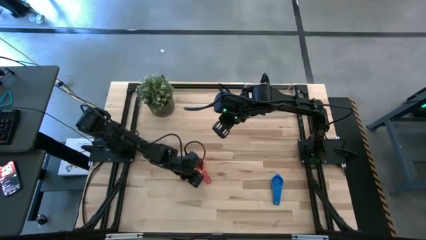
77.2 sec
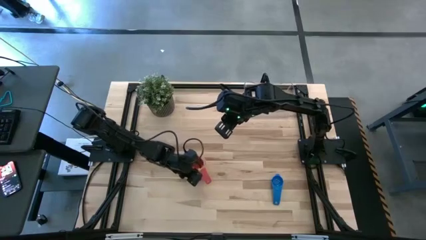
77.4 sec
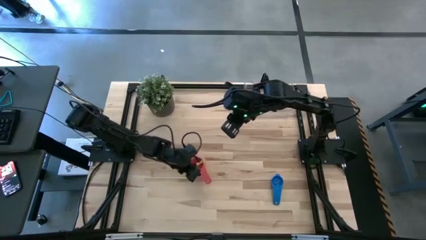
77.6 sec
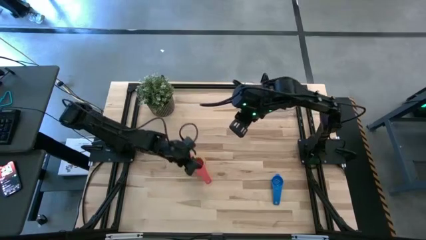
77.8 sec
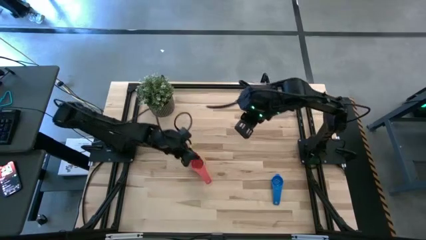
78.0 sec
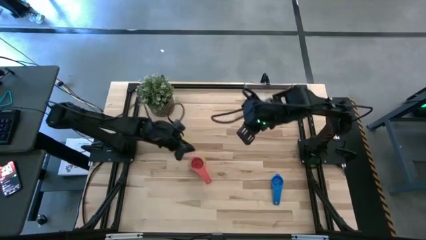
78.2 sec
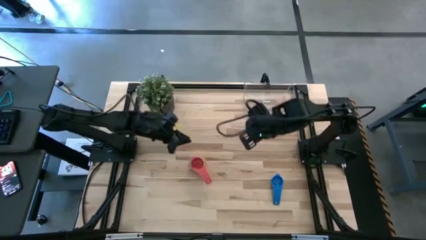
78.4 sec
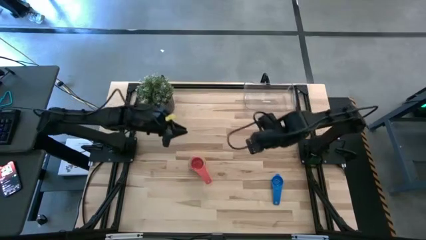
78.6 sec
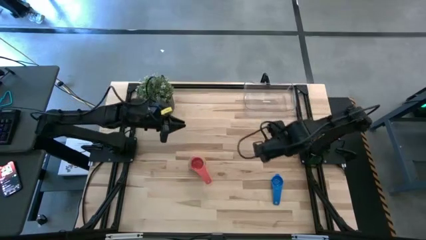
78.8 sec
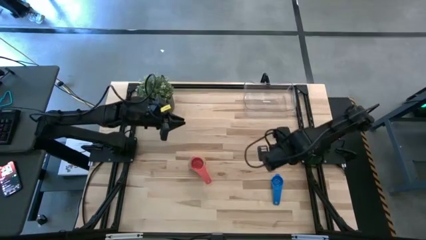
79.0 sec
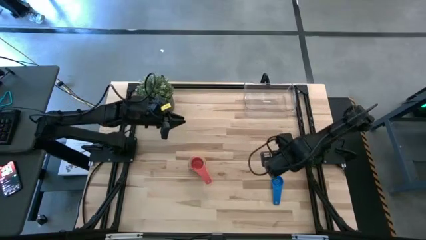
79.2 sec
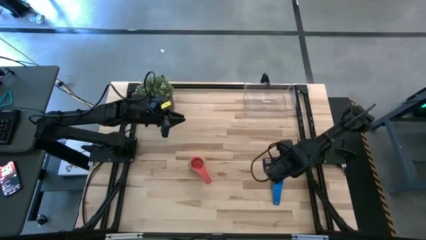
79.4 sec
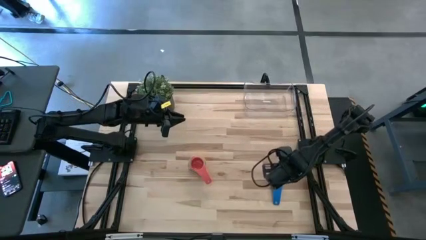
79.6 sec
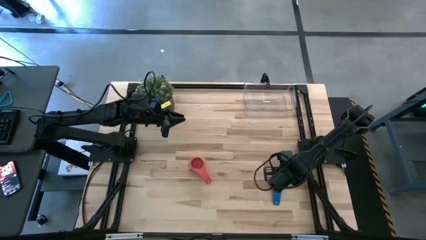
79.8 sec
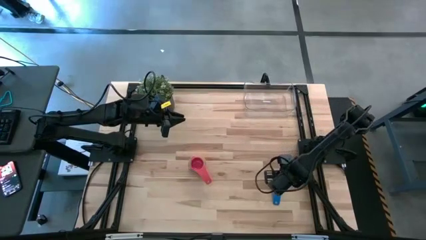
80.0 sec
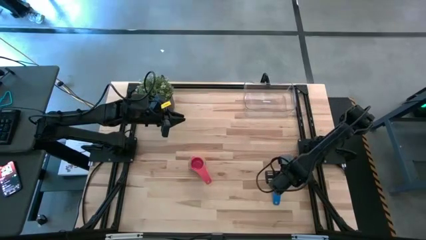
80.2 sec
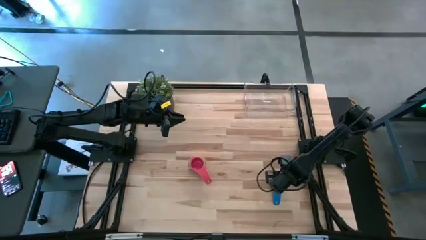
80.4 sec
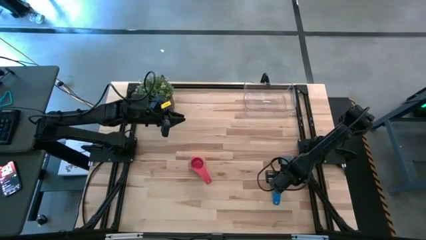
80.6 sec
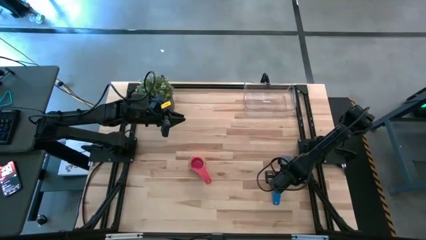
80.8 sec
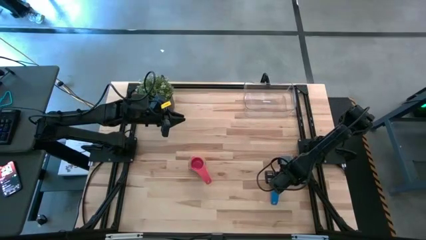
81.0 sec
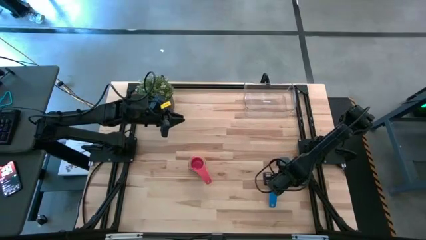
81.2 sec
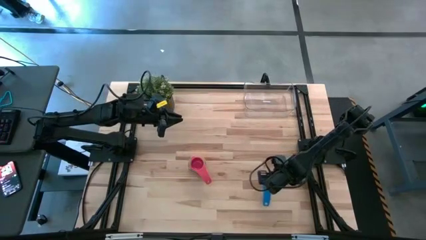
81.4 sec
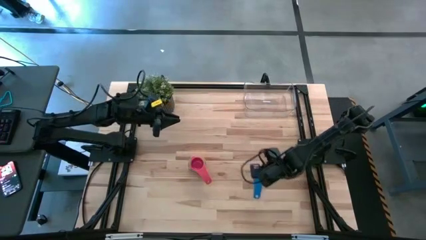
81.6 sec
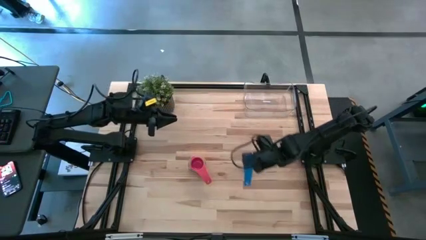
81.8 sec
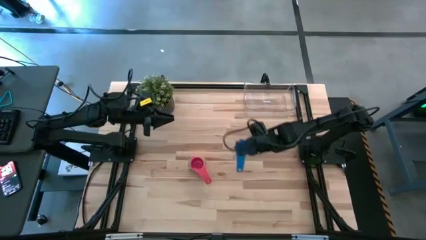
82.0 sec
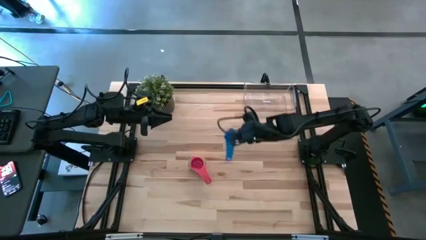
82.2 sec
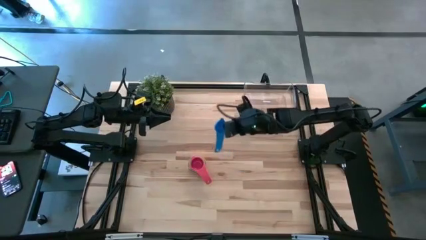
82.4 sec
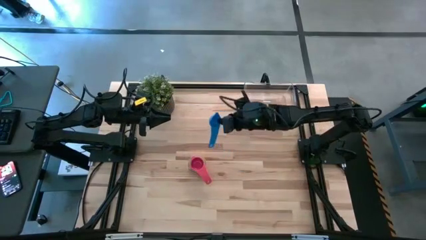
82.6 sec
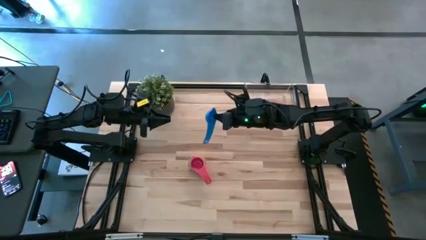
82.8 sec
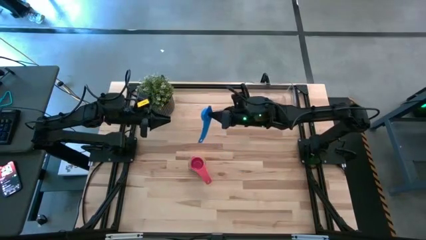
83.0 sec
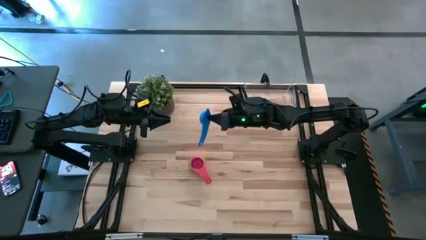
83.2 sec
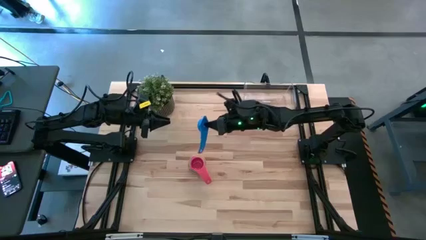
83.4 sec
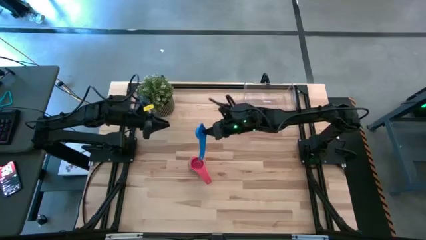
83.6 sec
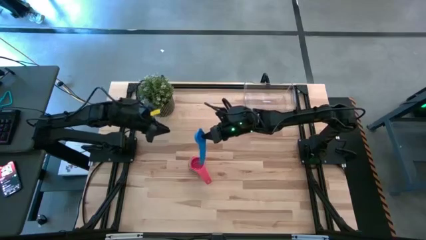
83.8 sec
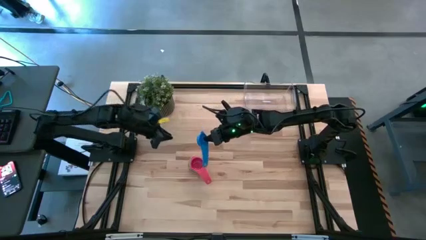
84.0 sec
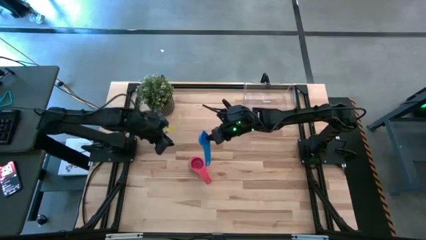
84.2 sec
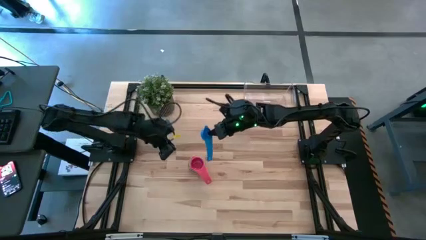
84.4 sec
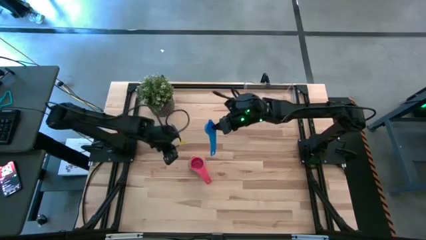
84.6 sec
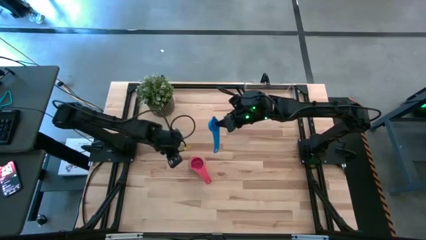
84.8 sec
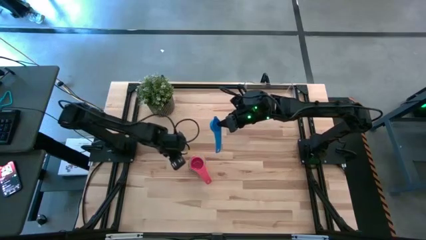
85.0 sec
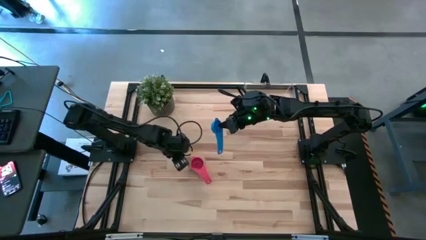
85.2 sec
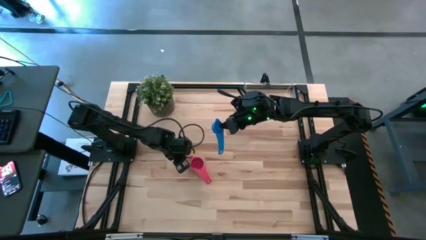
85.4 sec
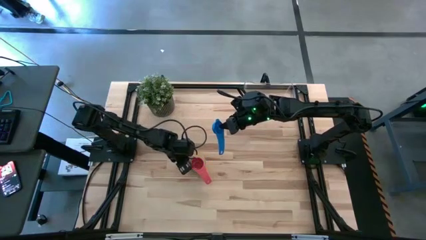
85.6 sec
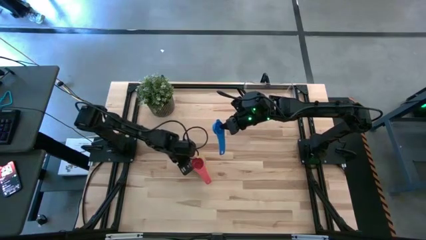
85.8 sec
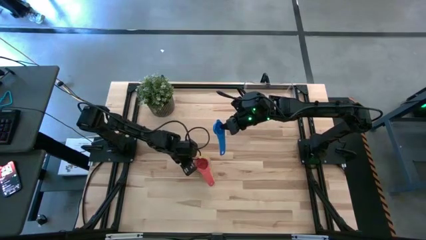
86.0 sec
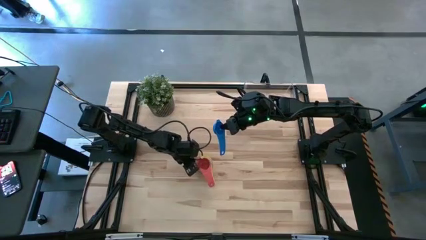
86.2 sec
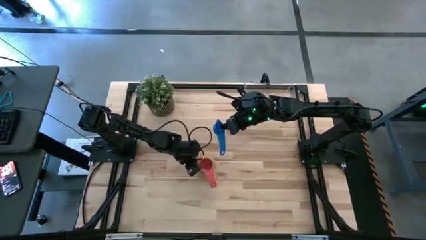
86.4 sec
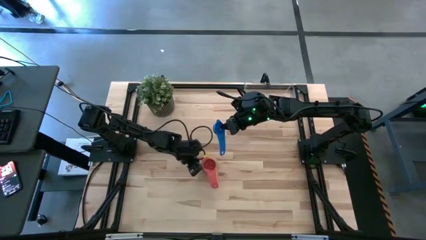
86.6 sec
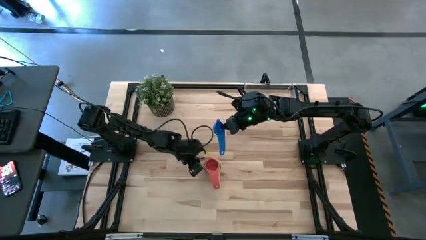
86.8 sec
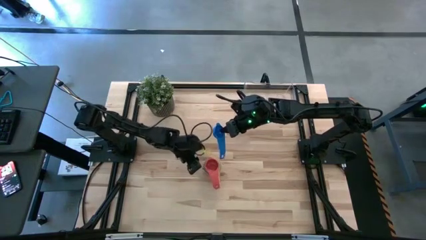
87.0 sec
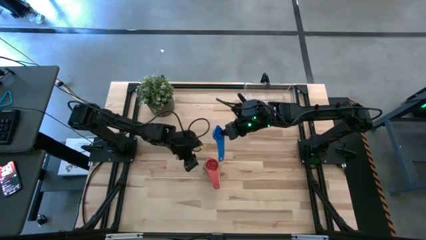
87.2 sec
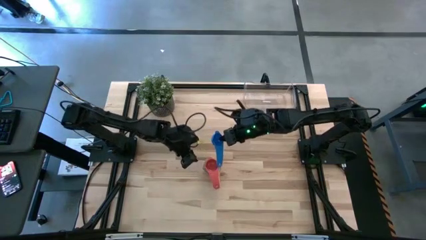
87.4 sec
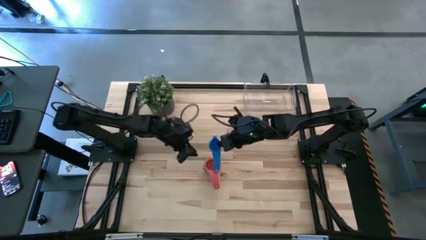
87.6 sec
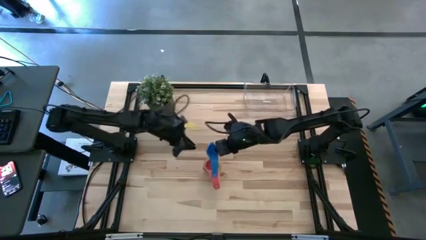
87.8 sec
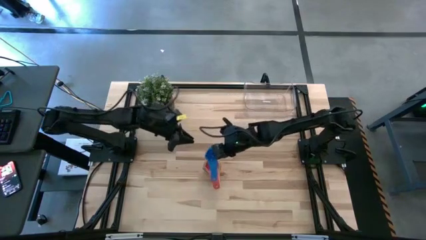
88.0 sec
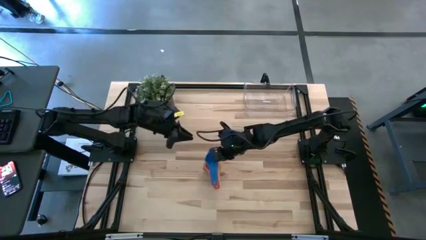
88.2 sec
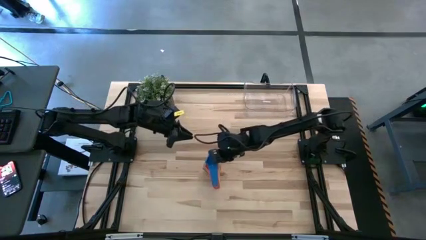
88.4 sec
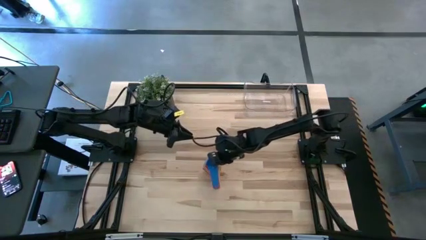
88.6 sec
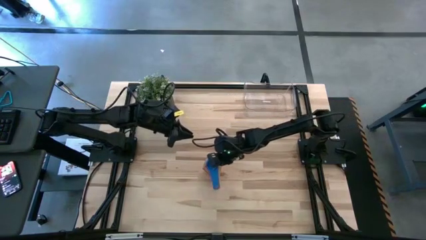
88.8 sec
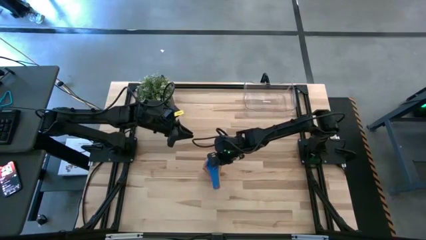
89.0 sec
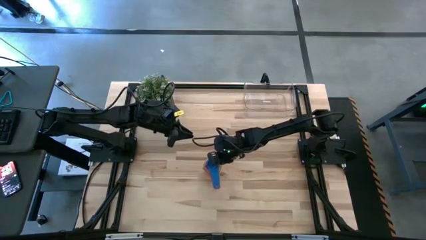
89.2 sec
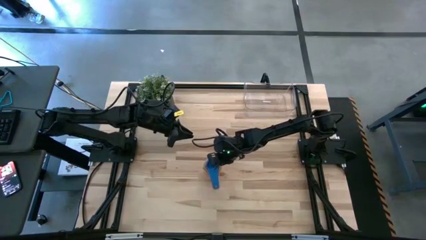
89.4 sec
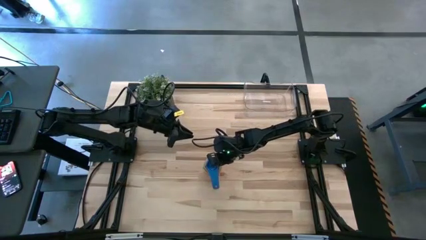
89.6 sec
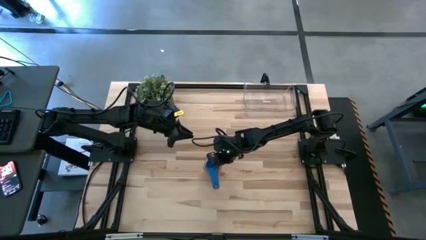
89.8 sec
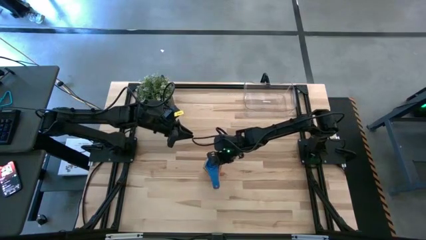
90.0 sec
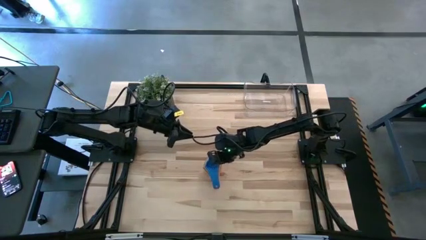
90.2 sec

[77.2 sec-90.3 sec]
Task: Nest measuring cups in basket
Stack the blue measuring cup on top of the red measuring cup
